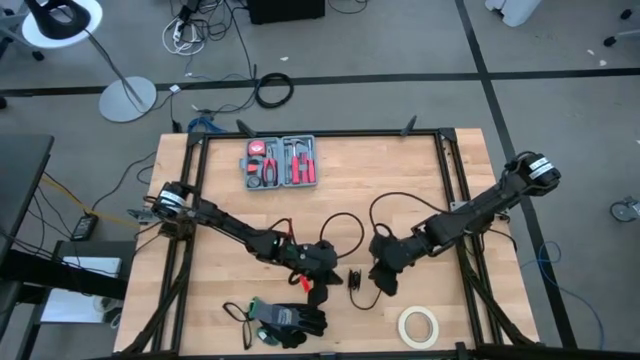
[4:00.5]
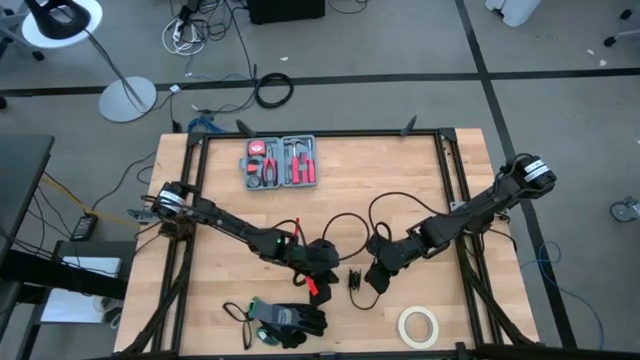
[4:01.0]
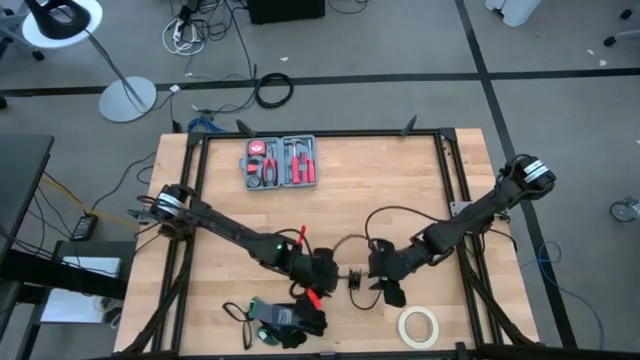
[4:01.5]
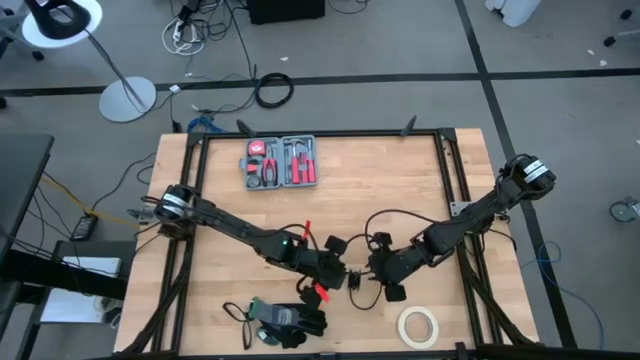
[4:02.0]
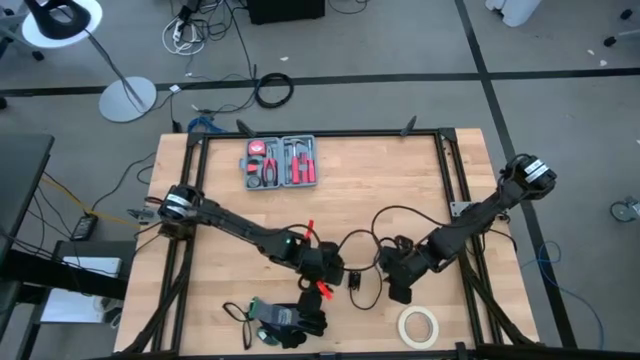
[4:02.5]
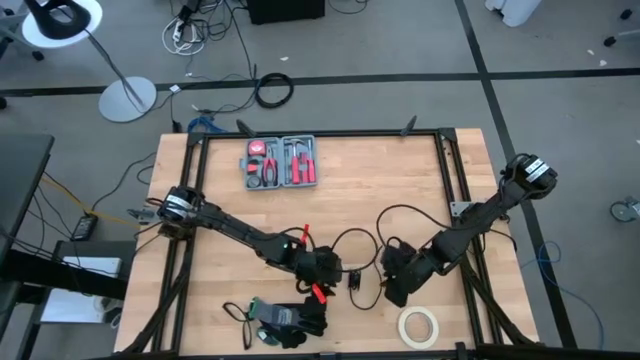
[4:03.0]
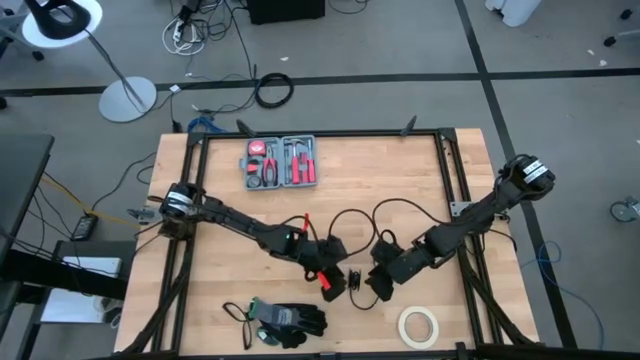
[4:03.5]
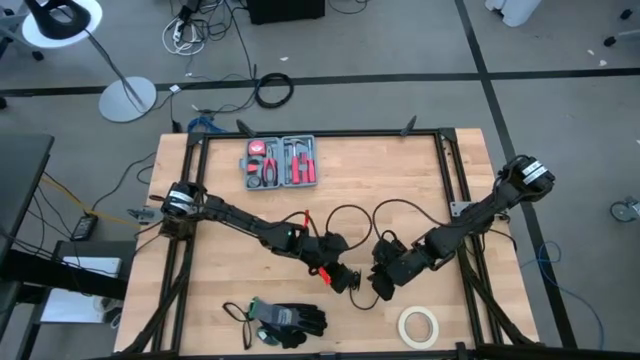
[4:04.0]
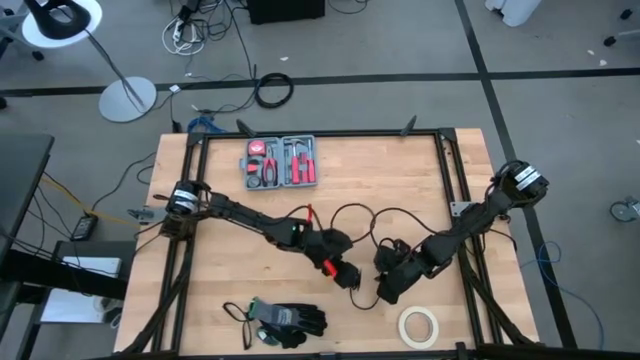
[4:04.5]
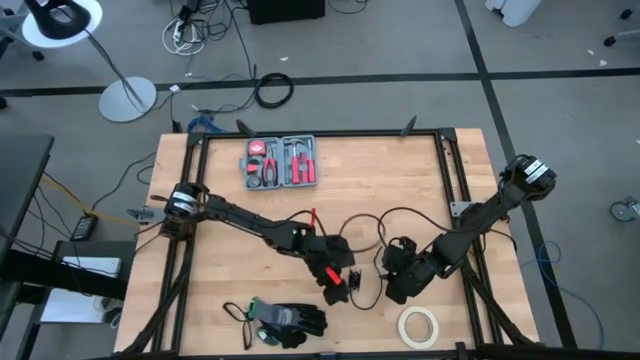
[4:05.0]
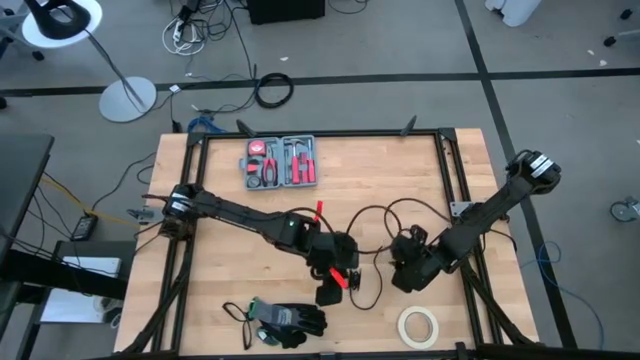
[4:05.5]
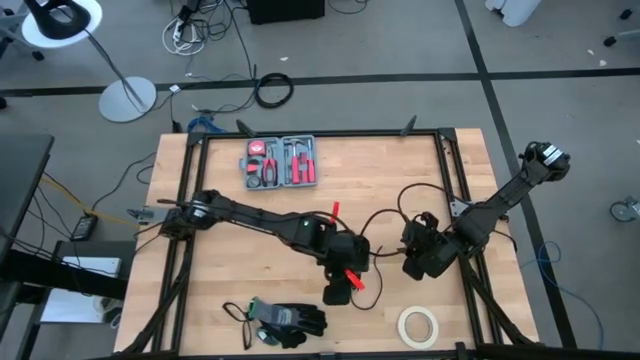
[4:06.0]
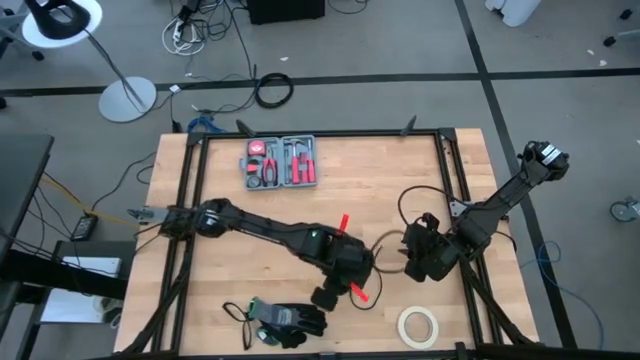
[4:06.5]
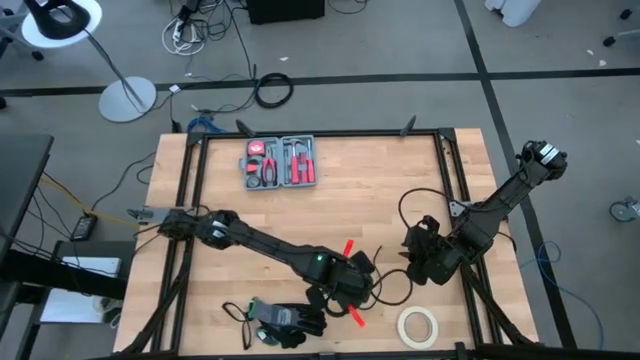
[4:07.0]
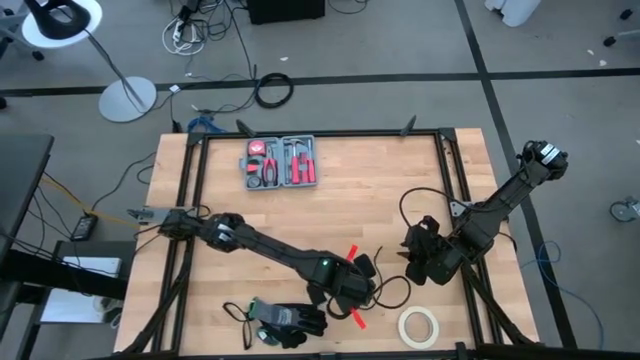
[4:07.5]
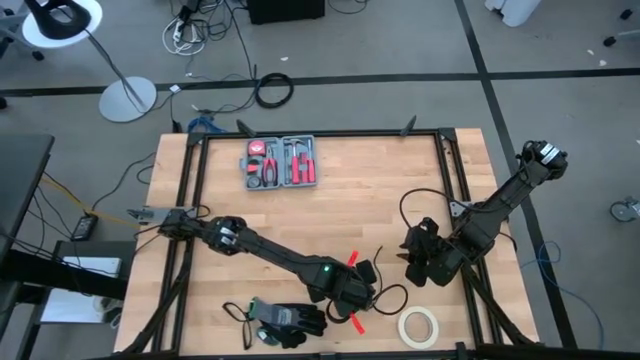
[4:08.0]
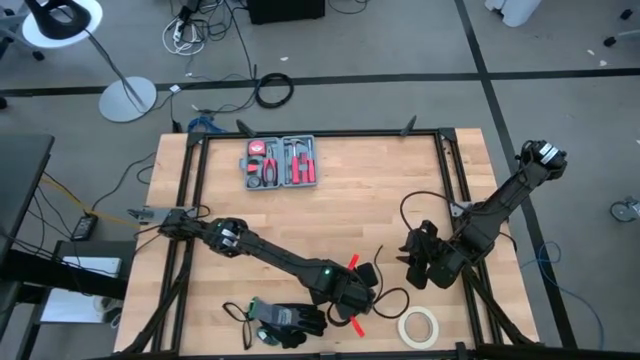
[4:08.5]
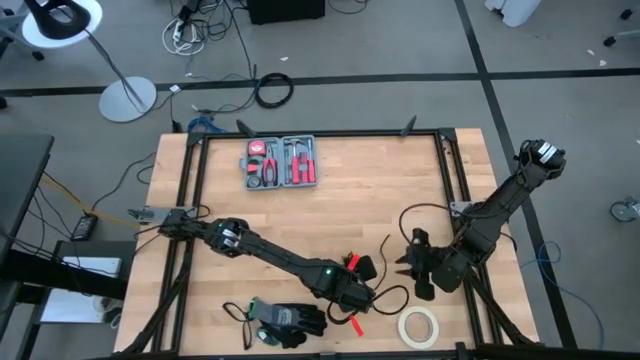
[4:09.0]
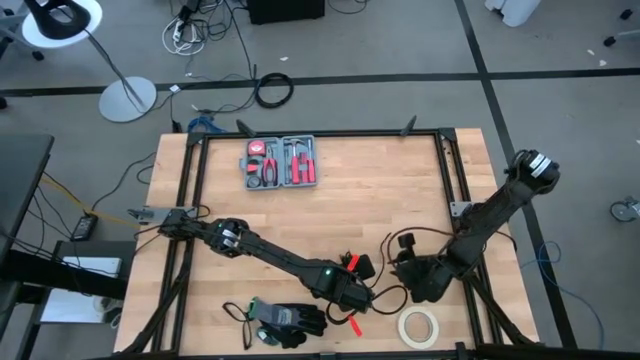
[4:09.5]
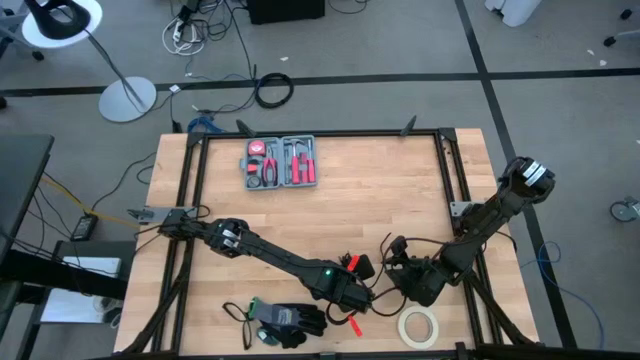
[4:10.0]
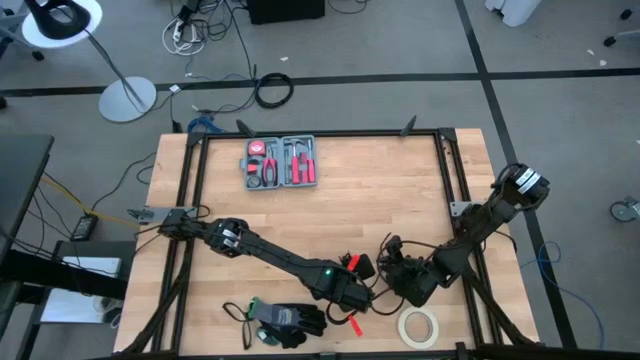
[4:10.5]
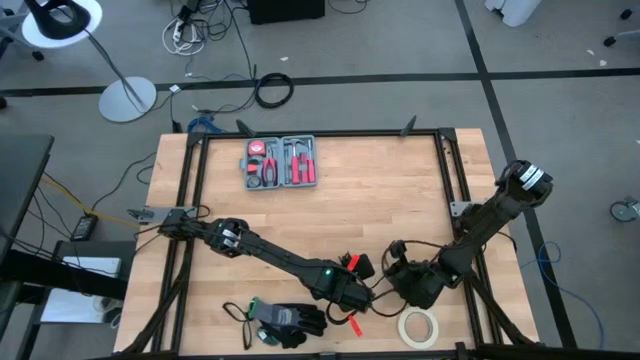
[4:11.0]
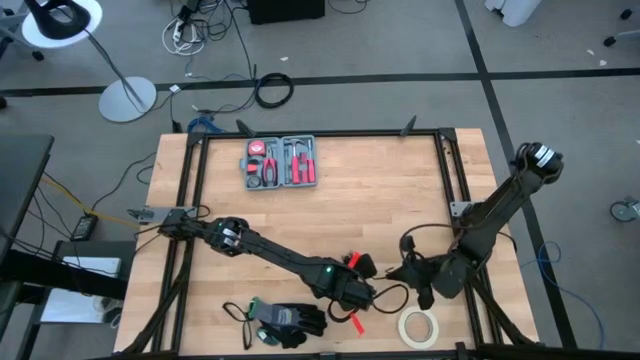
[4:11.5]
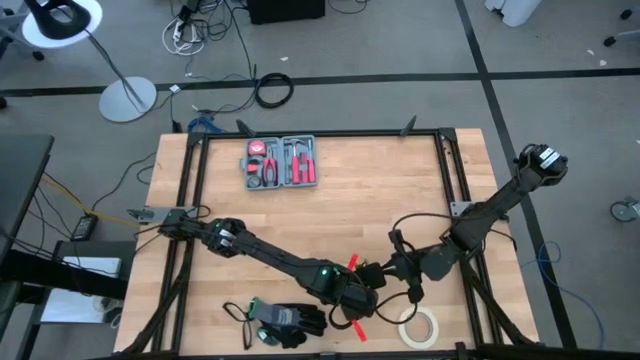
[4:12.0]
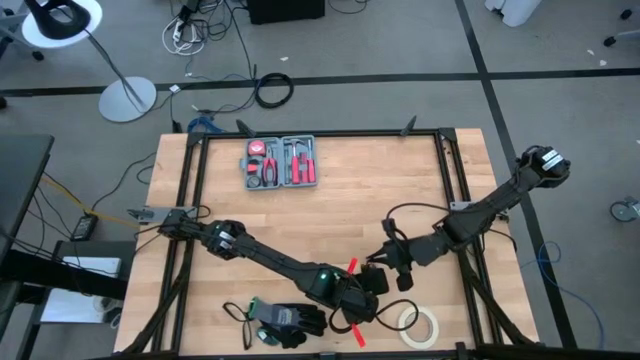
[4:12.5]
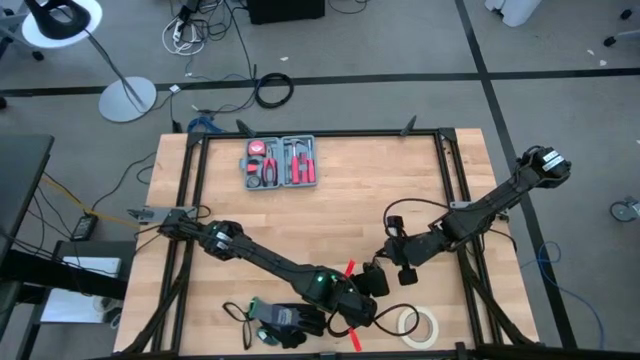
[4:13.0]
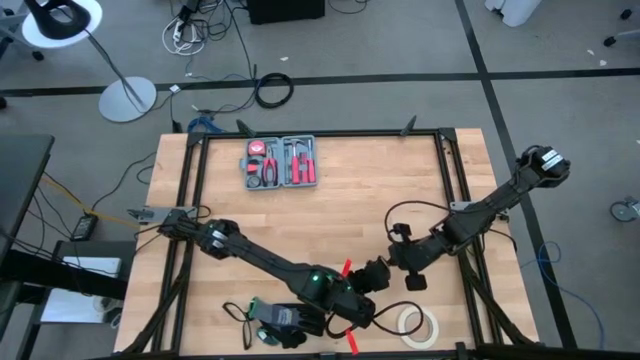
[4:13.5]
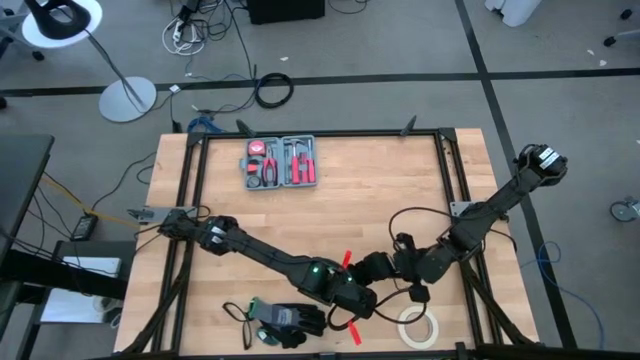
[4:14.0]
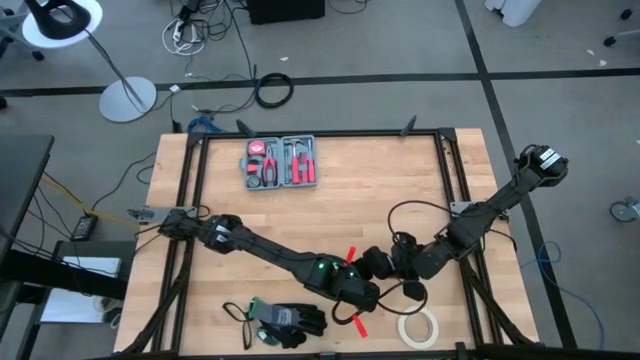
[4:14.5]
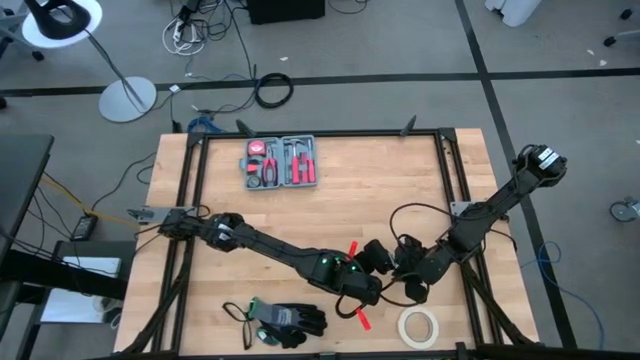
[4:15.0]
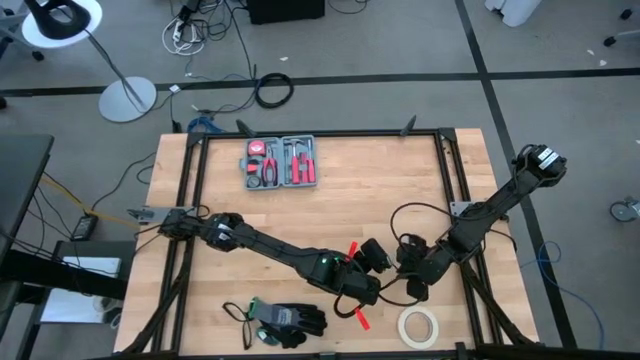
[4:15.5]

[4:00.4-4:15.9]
Task: Coil cords
Coil the black wire cable into the black spool
